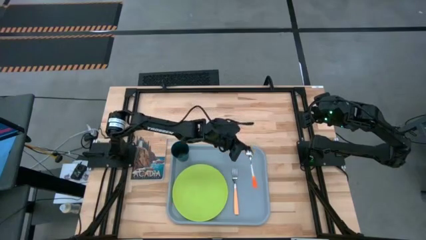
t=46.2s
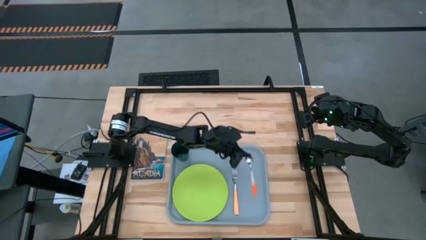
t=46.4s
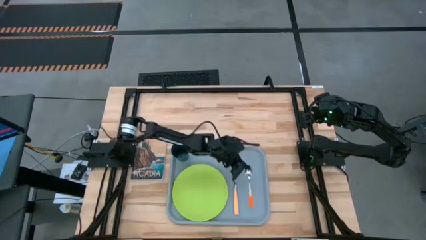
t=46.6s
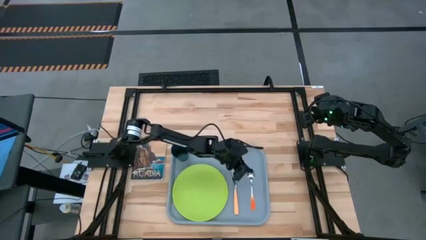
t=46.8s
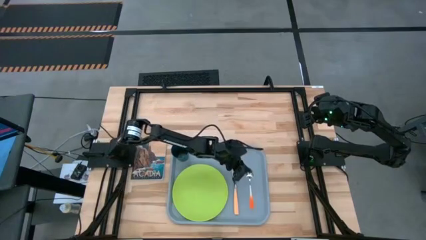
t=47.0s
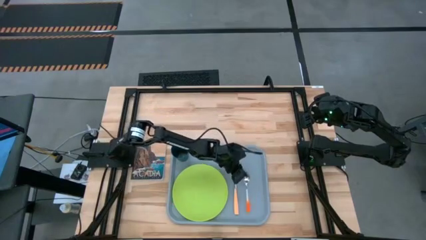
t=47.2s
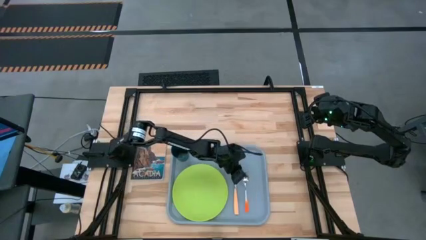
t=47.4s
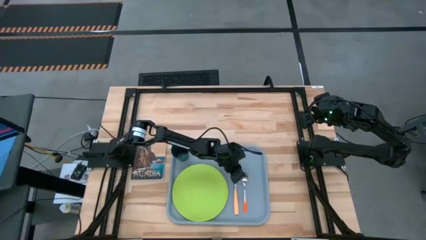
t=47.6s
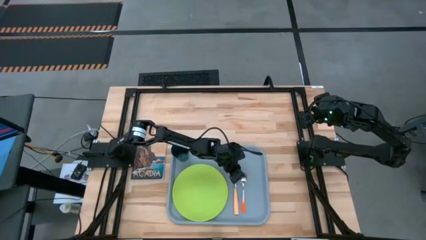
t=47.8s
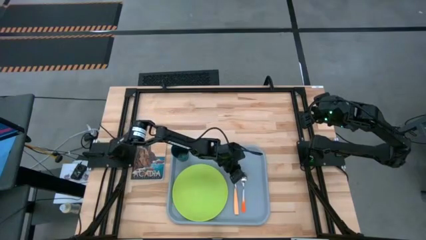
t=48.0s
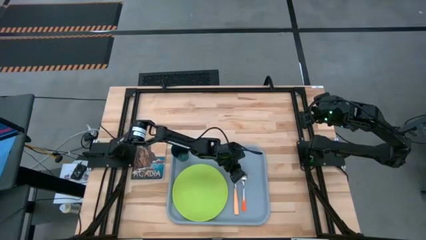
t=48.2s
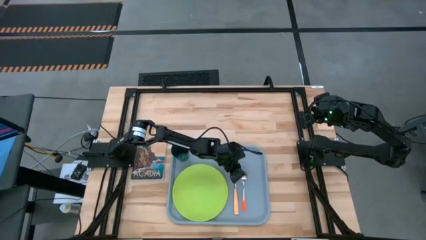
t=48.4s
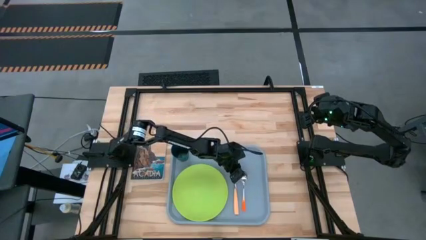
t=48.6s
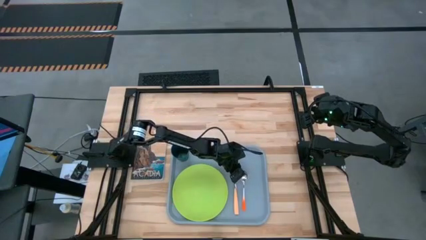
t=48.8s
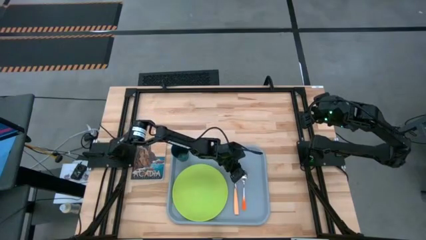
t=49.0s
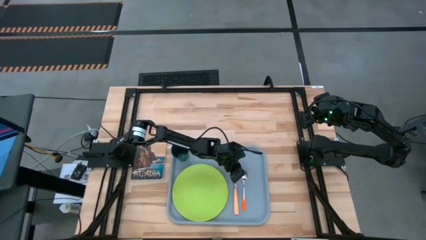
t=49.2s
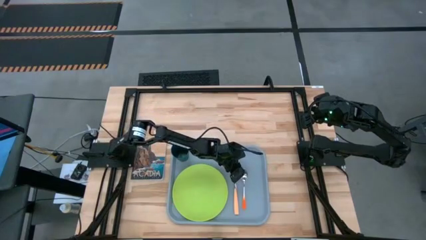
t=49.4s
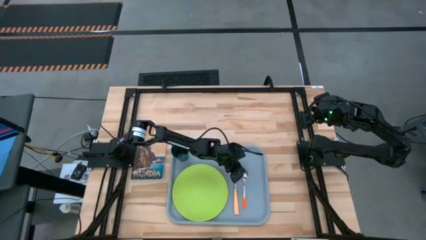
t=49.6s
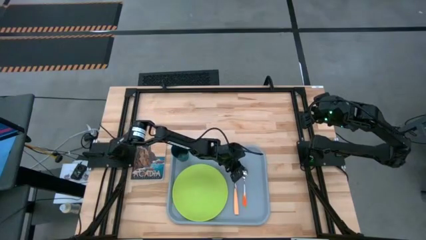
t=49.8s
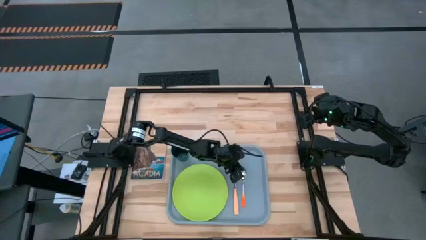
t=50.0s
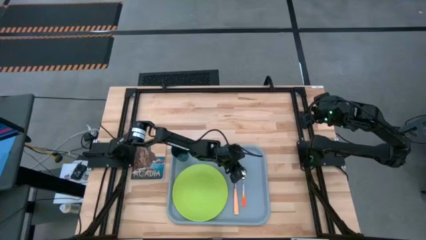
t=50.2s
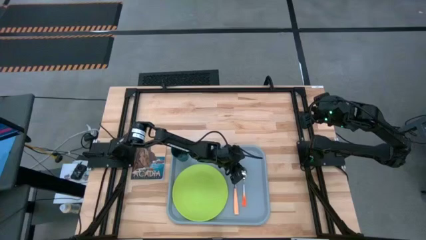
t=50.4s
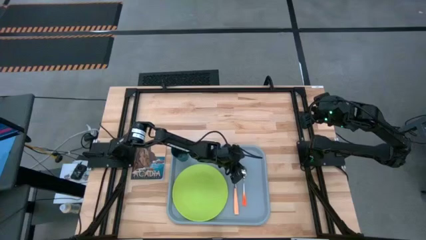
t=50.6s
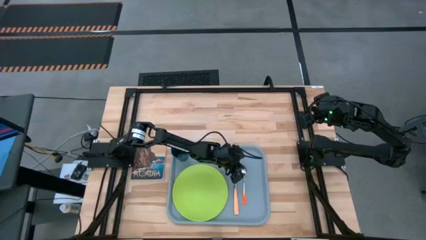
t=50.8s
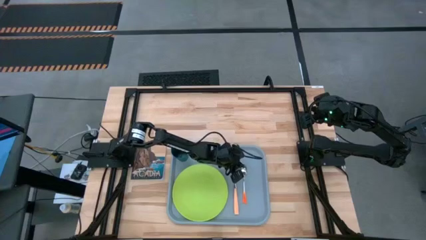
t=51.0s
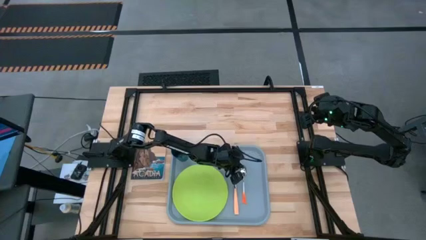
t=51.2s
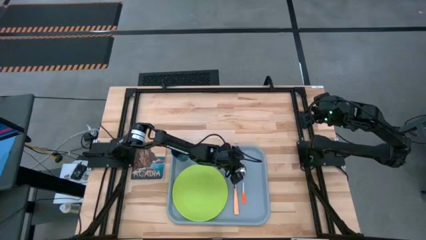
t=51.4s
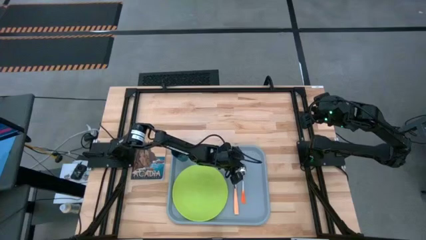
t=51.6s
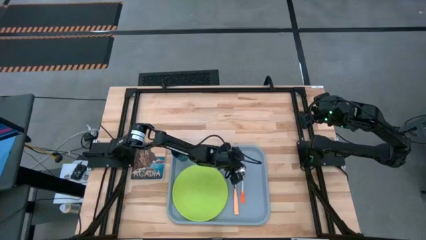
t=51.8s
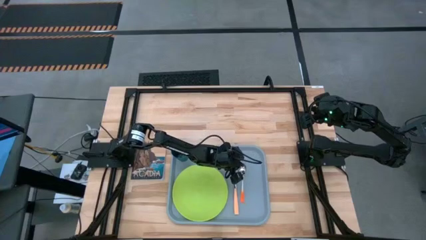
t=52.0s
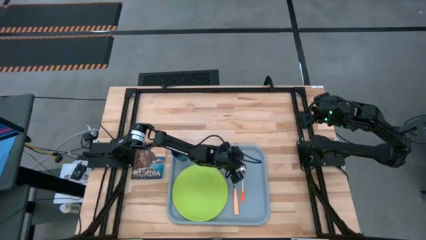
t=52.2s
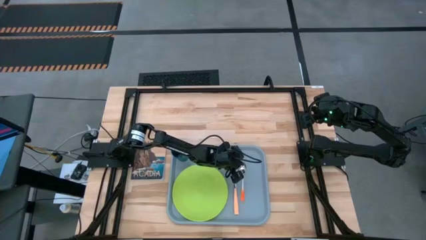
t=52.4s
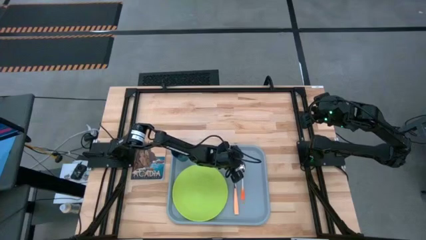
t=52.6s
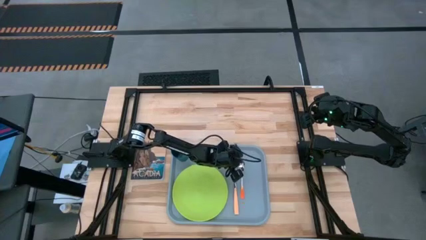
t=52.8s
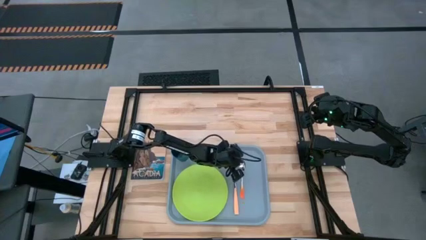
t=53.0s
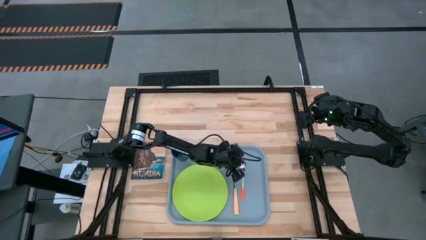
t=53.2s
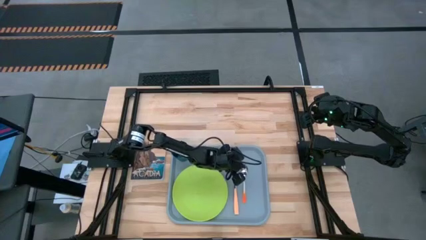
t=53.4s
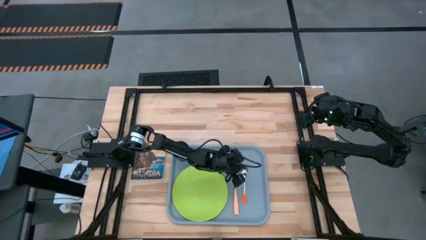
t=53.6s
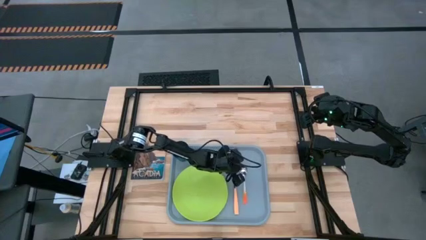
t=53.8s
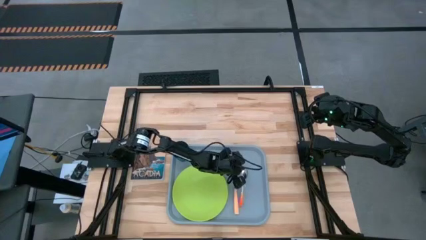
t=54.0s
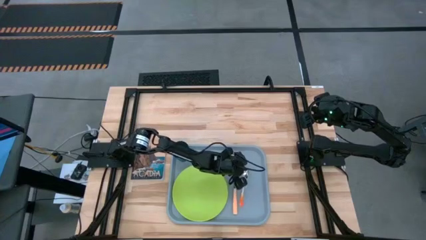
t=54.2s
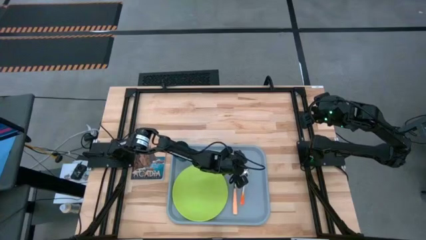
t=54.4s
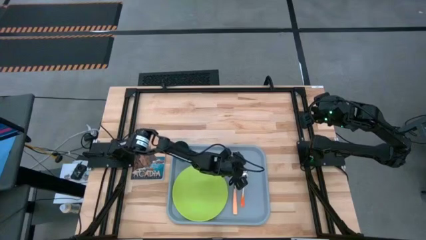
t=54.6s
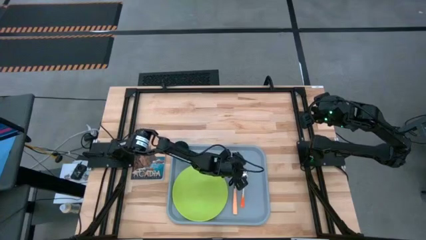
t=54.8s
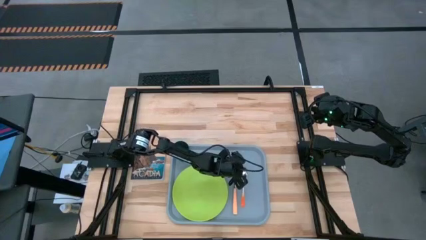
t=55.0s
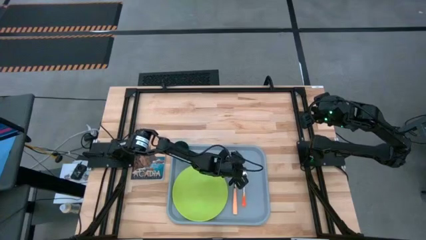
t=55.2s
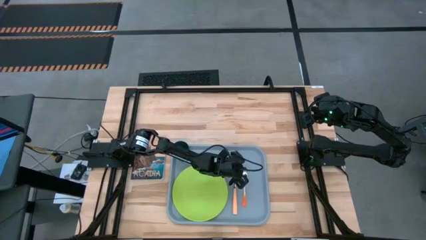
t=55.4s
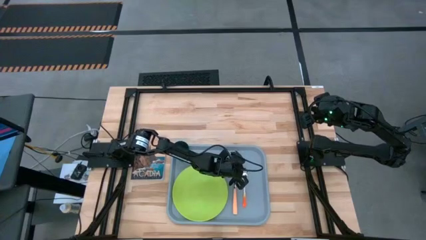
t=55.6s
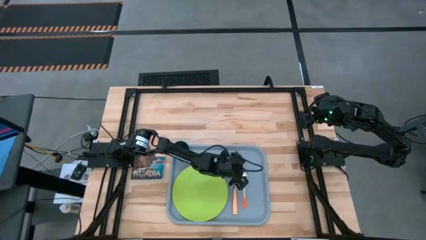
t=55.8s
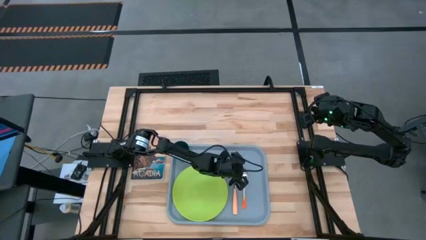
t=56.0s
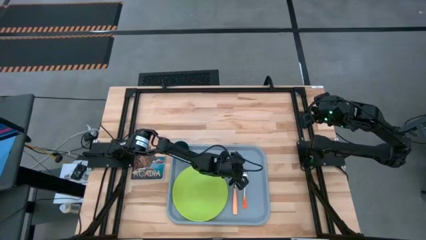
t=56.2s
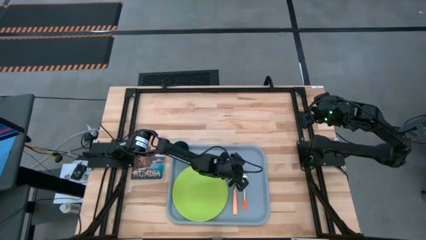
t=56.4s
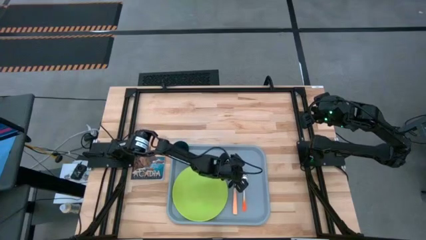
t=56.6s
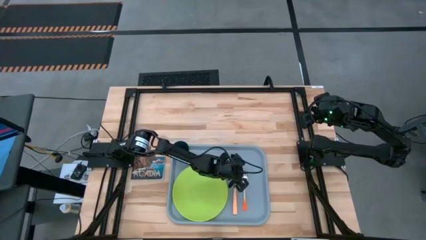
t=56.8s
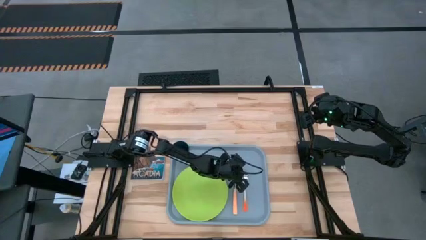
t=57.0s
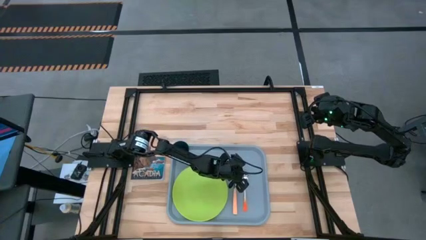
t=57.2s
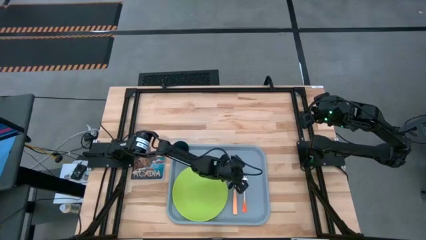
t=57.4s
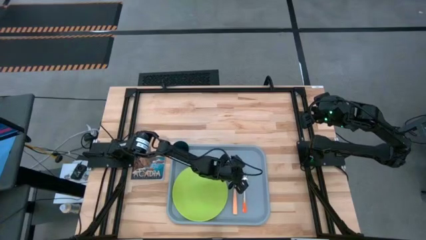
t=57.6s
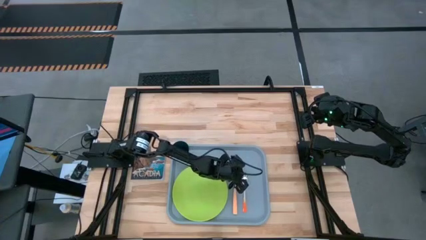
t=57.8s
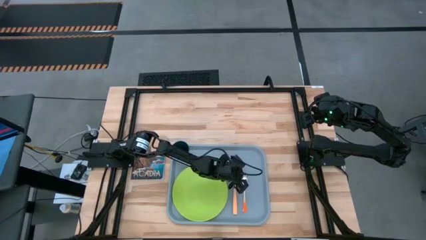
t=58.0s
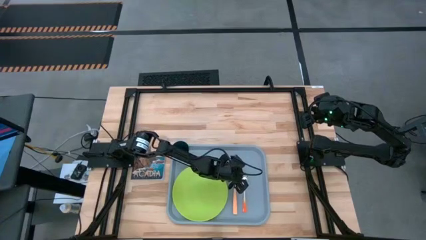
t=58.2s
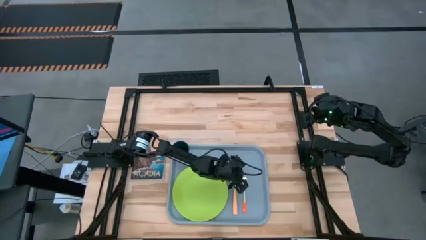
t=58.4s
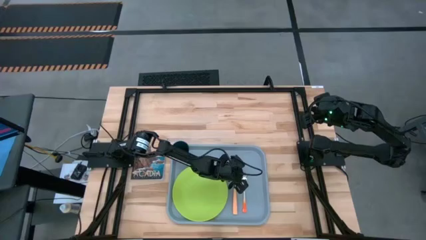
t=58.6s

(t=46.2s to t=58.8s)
Task: Pick and place plate/cup/fork/spoon on tray
Put the orange spoon on the gray serving tray to the right of the orange fork

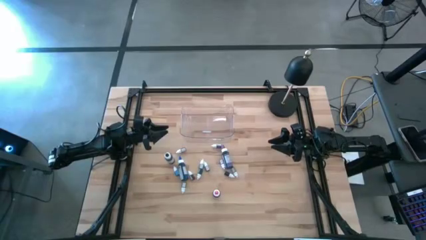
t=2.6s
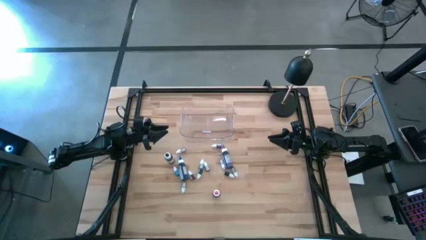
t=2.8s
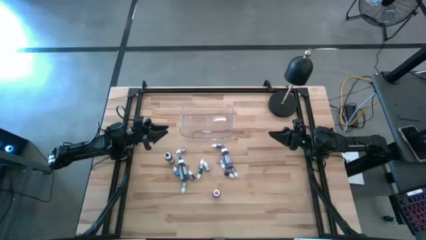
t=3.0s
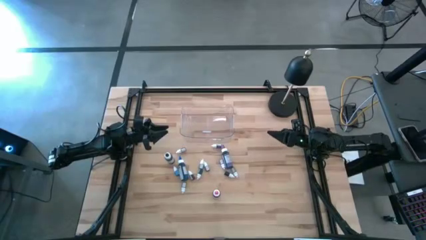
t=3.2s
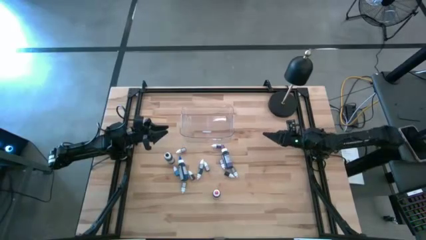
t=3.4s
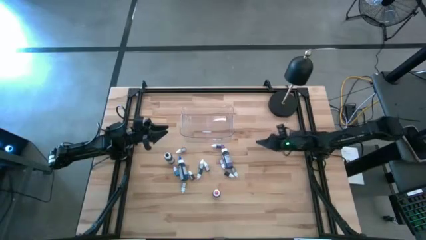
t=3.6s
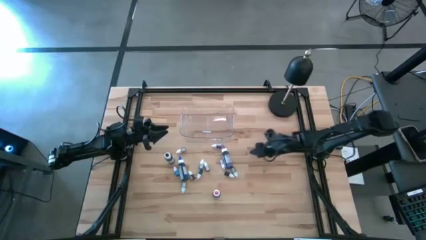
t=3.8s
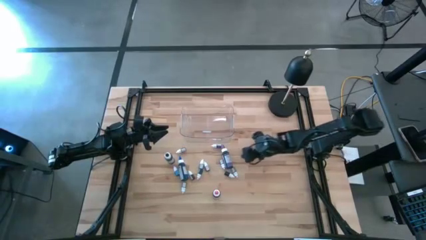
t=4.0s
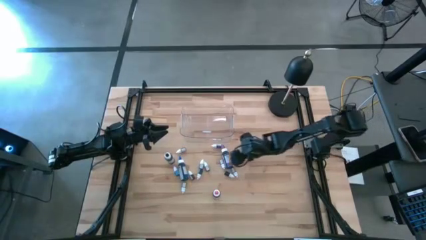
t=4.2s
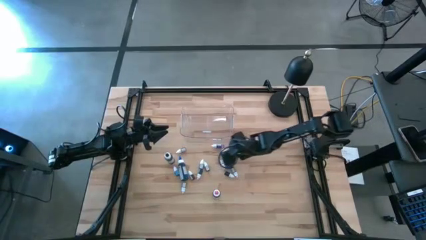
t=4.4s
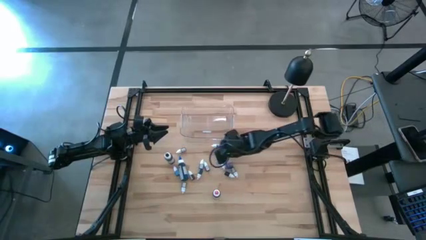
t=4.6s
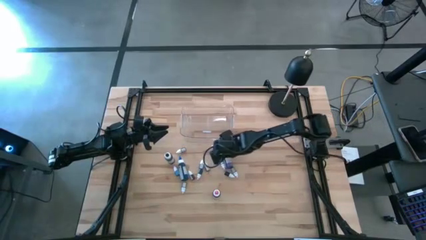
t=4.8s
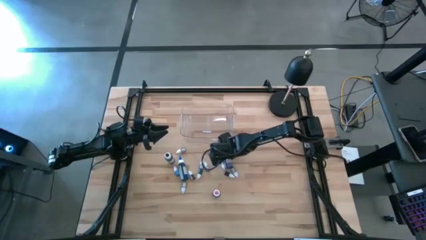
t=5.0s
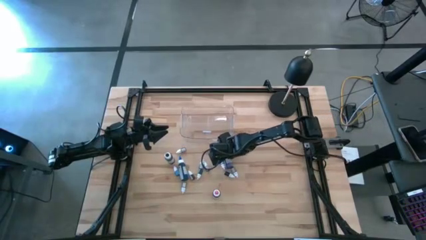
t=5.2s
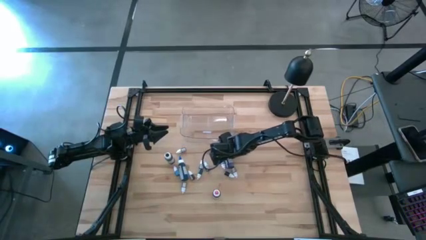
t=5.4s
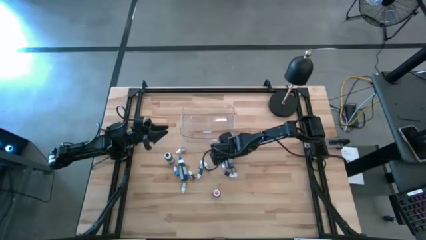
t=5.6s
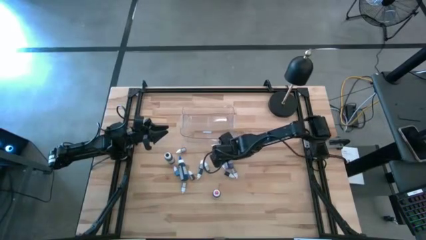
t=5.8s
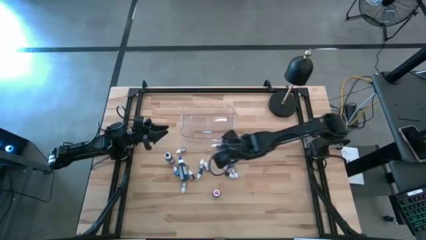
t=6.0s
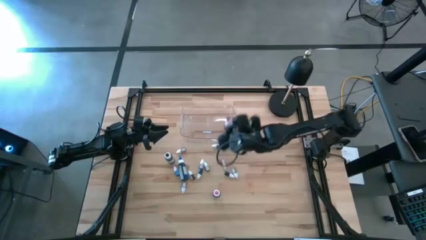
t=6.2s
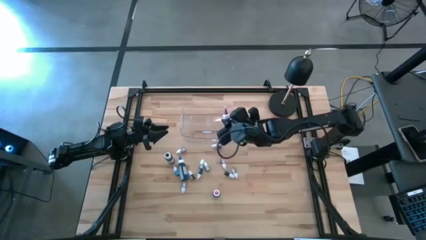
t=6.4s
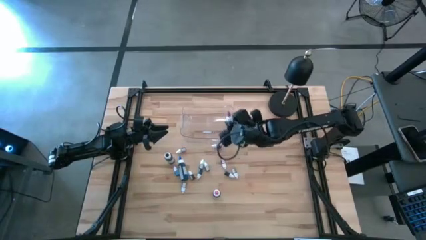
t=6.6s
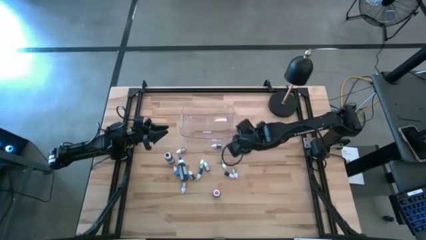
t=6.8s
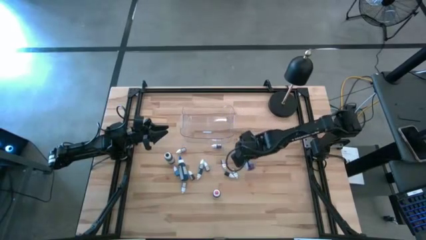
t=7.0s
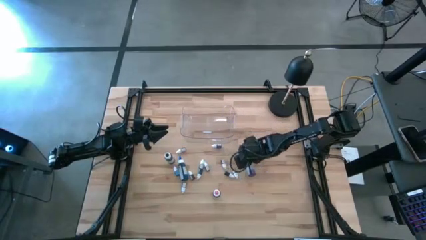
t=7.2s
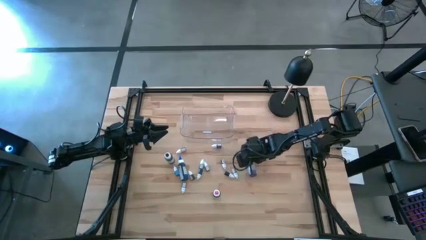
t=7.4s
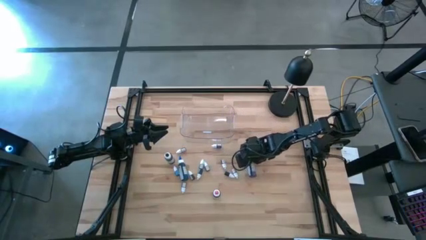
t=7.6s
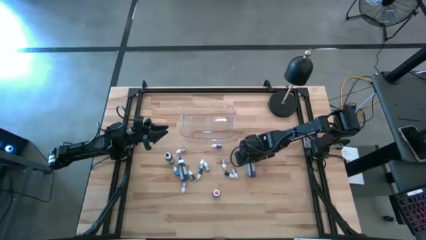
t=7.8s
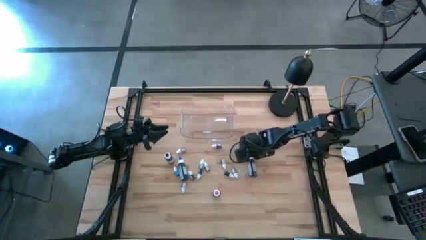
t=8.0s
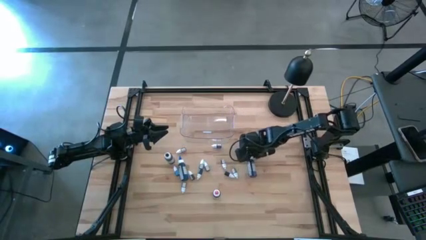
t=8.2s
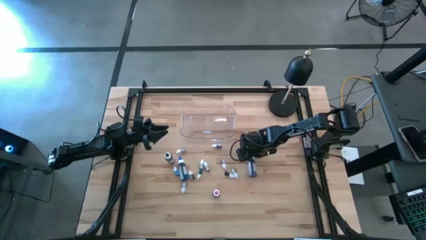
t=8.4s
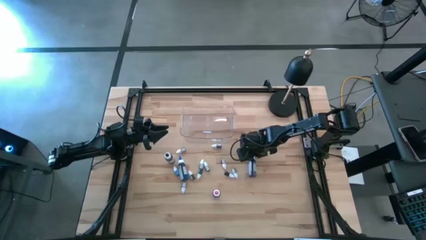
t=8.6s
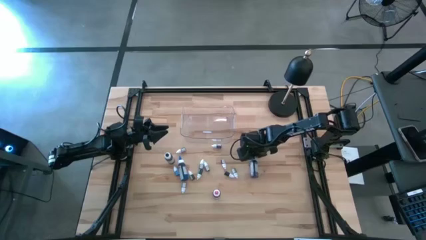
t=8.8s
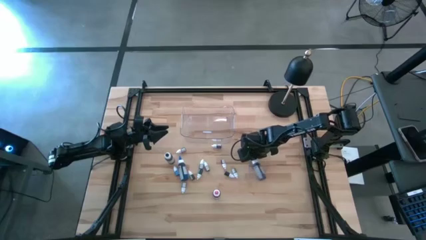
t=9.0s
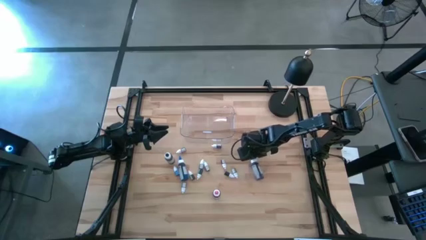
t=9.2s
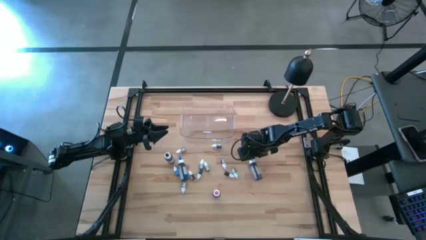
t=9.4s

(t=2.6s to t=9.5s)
Task: Pick & Place food coloring
Put the large violet food coloring bottle into the transparent bin
